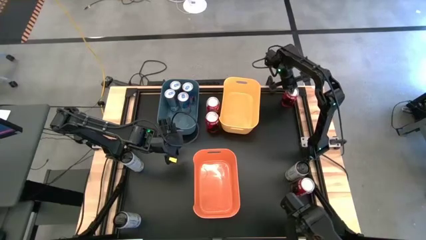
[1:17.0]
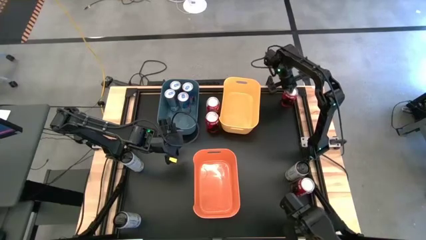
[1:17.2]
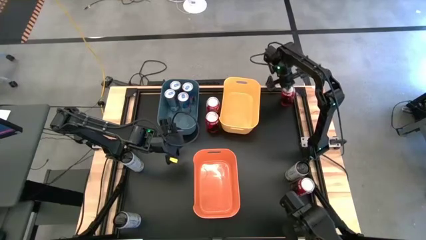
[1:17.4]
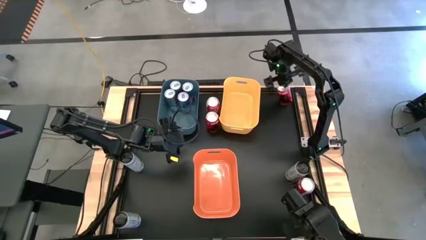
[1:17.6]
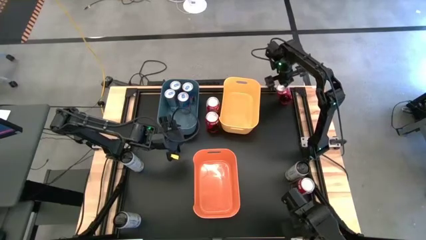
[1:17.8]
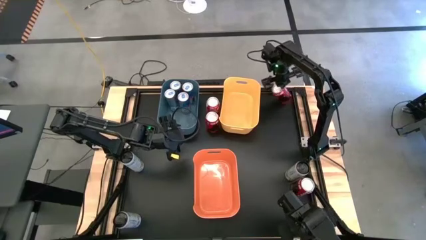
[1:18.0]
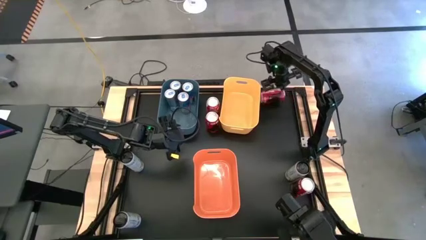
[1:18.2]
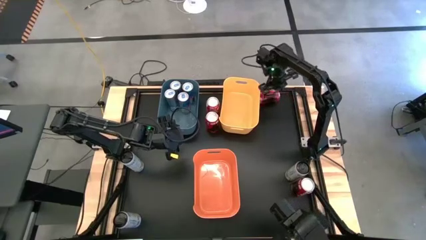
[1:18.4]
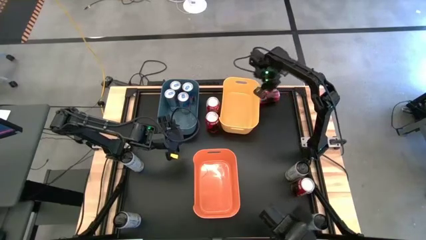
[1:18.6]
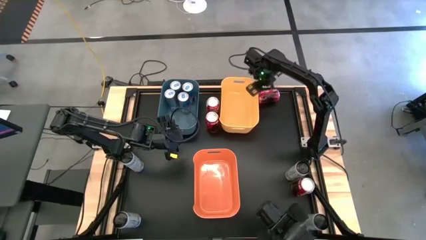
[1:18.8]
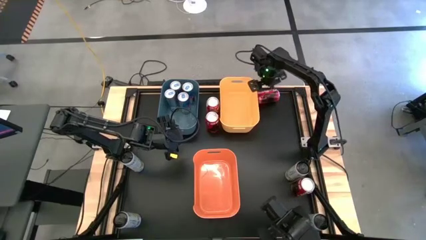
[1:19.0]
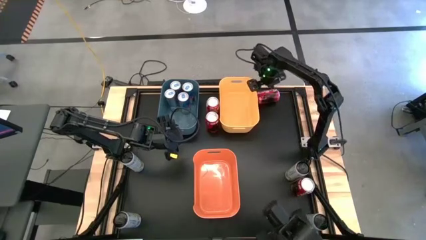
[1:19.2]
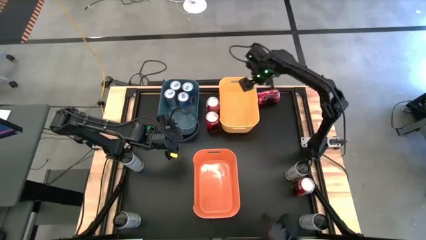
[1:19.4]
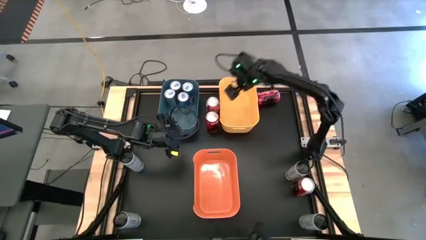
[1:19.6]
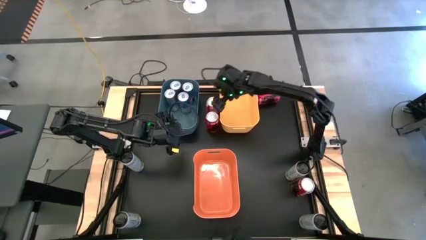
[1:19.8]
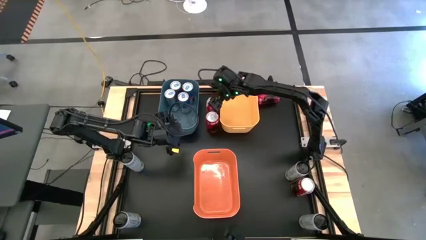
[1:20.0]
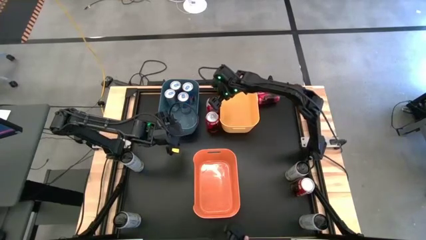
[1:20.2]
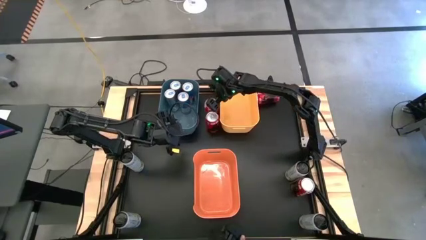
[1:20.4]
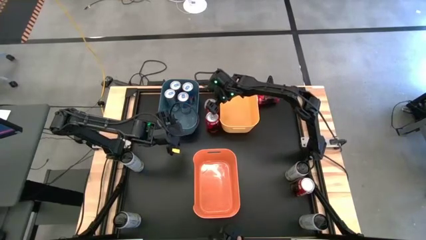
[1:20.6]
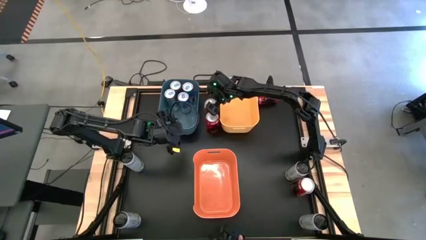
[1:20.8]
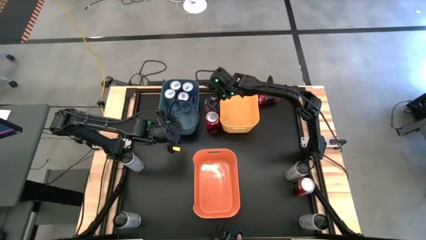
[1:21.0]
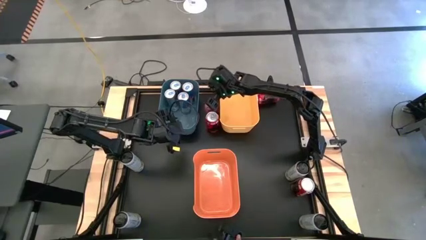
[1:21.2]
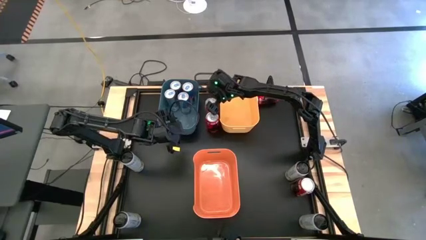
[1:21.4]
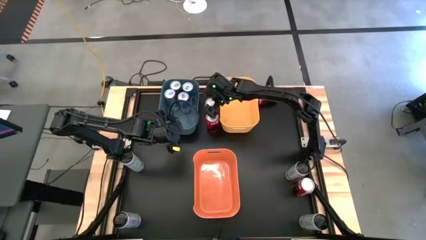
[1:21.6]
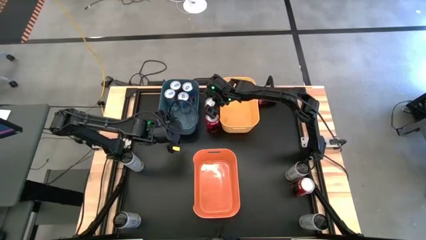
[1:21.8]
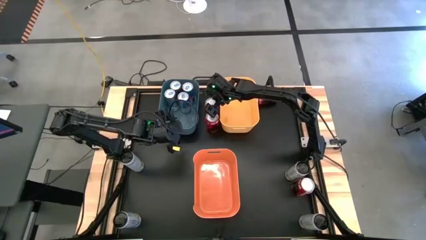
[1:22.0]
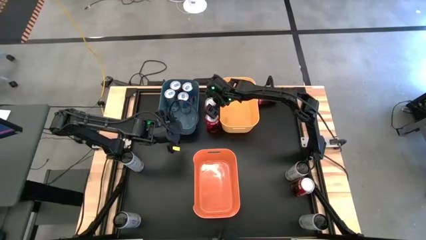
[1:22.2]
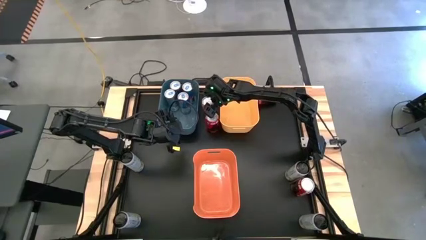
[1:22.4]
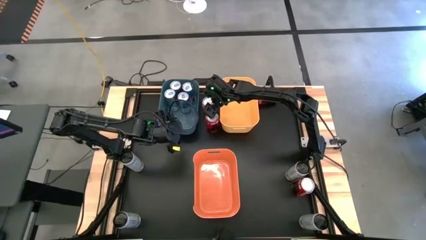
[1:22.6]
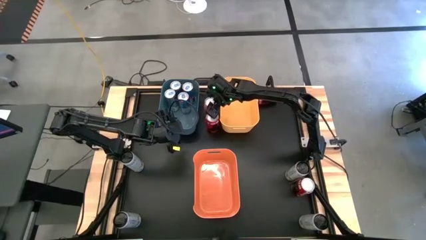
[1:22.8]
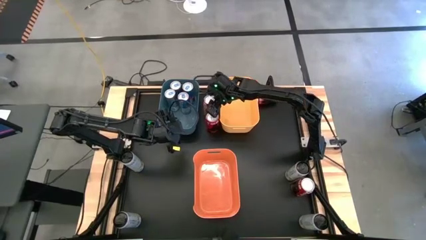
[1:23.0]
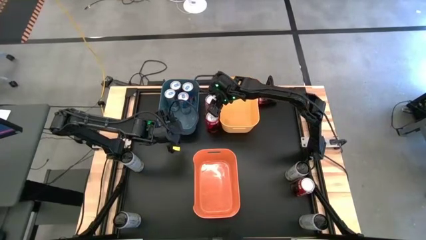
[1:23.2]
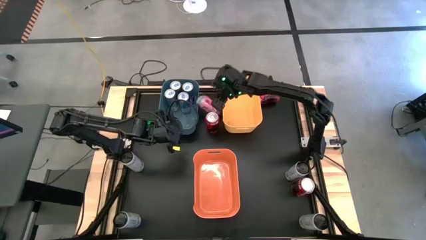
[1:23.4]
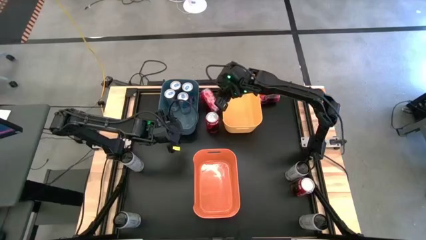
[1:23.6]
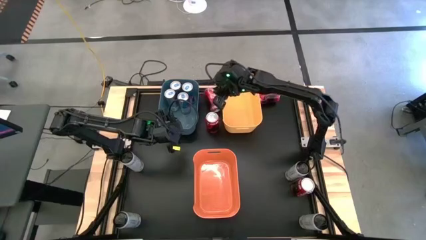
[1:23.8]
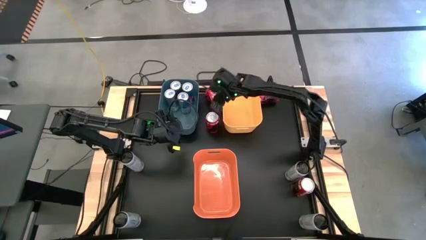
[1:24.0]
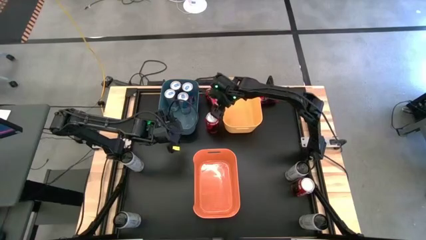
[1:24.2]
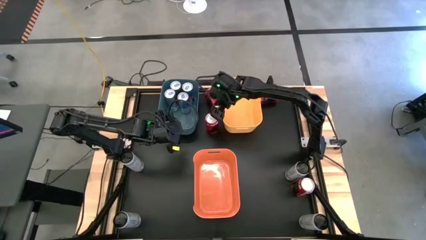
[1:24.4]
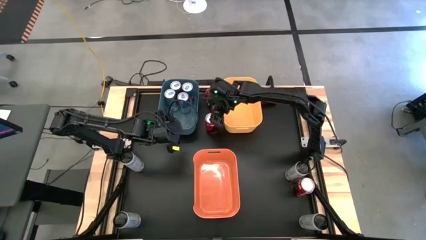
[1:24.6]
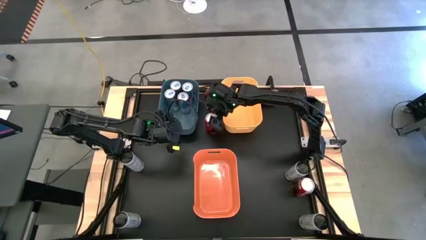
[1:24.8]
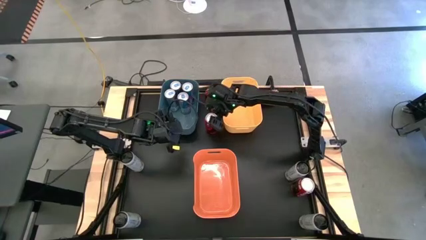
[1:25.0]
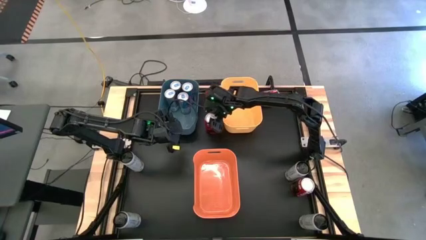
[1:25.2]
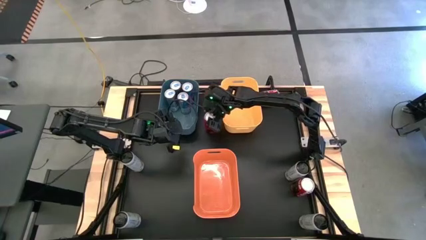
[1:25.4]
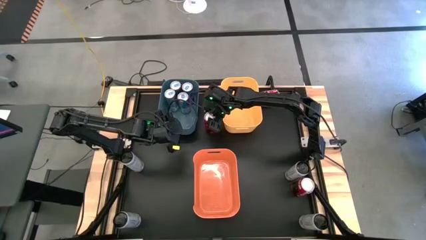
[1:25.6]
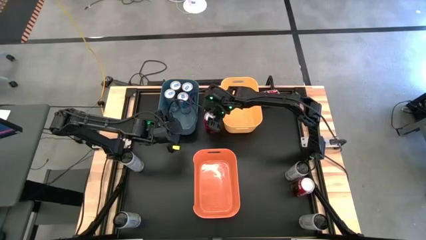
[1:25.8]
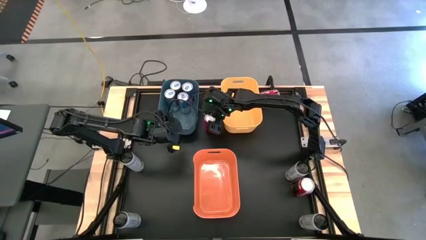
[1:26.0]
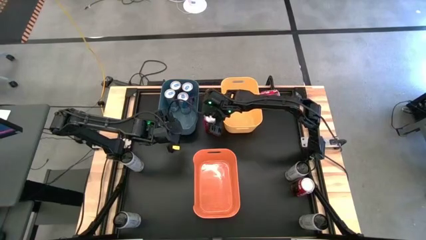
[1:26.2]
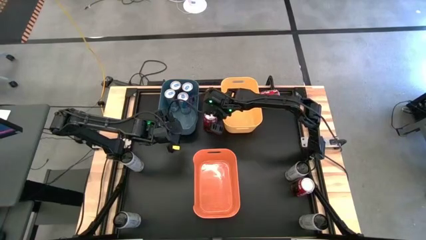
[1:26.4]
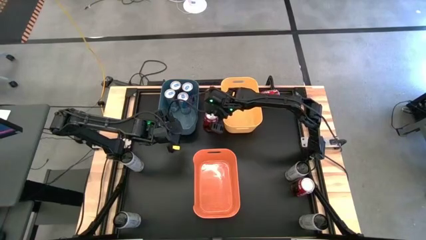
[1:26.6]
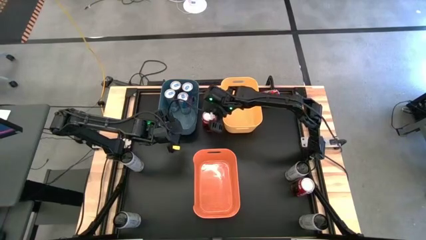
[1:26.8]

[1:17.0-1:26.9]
Task: Sort soda cans
Put the bottom left red soda can into the yellow bin

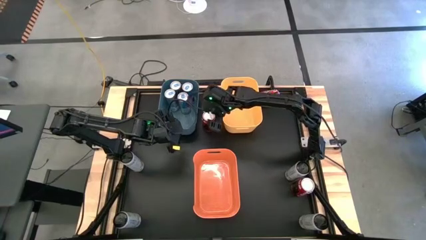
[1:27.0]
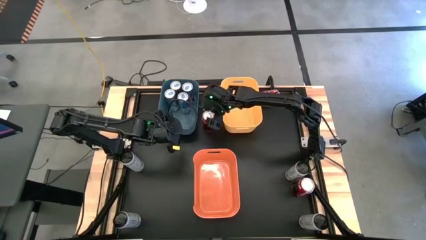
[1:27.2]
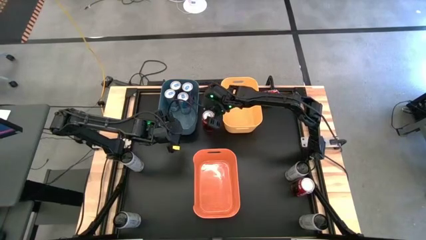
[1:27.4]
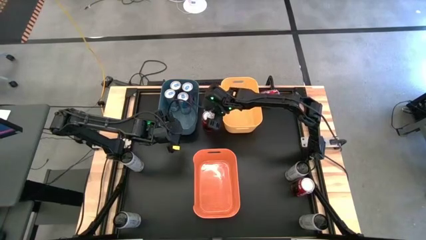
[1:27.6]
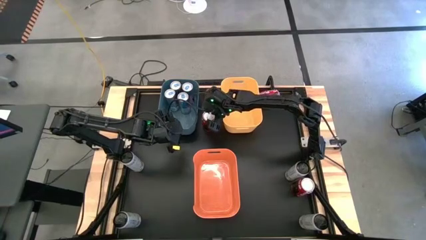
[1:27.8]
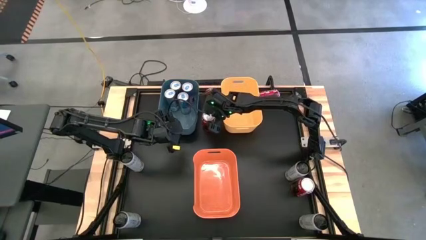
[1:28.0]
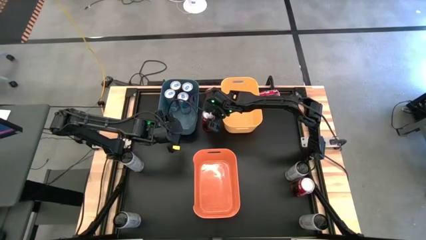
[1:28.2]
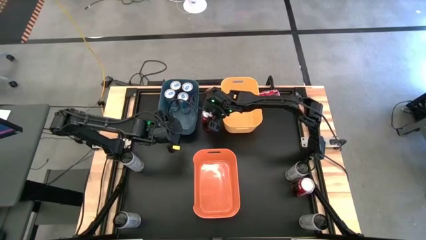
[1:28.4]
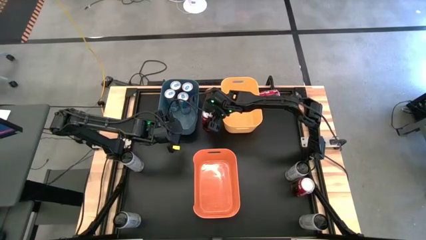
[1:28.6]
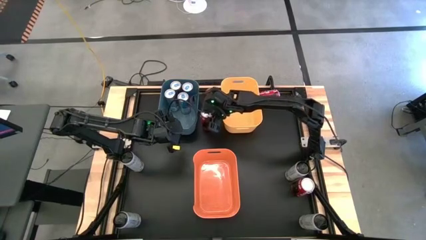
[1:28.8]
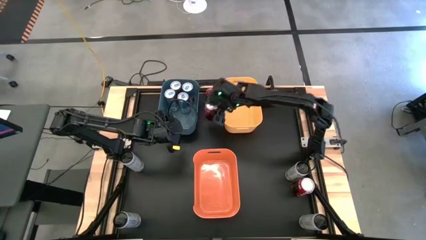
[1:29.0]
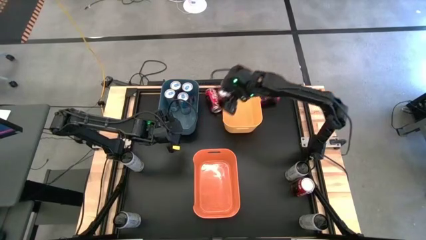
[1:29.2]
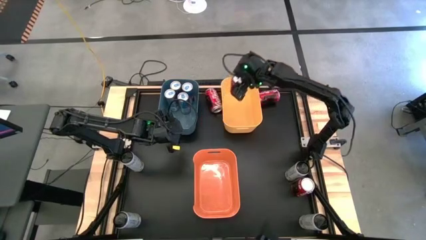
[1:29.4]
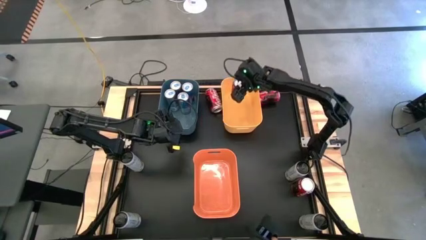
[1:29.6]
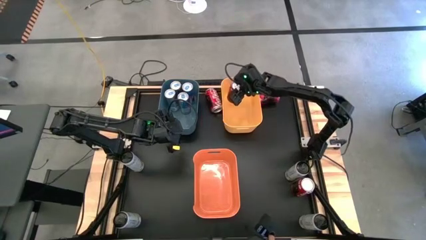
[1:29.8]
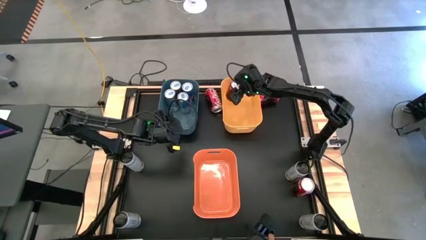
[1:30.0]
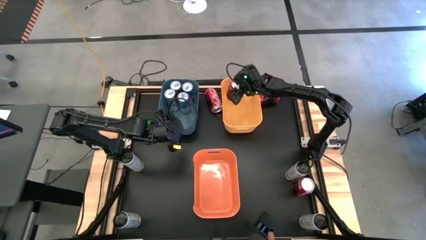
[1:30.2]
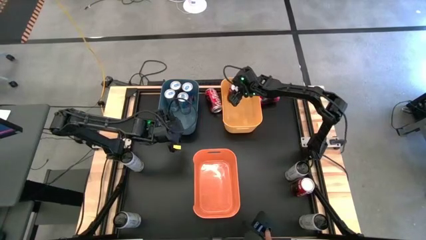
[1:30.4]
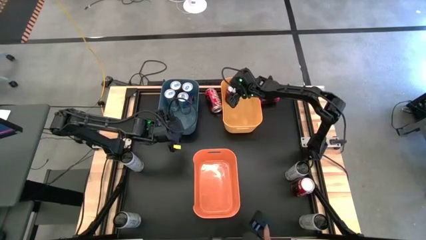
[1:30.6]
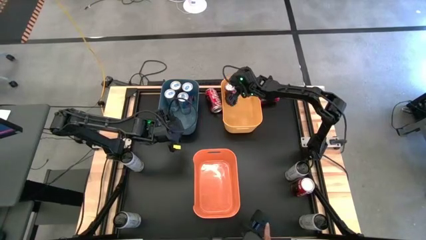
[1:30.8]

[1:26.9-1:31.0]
Put the bottom left red soda can into the yellow bin

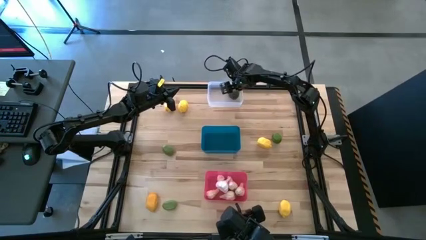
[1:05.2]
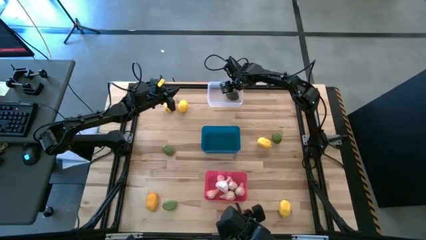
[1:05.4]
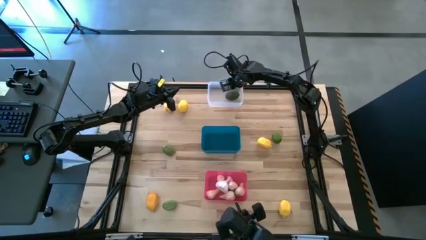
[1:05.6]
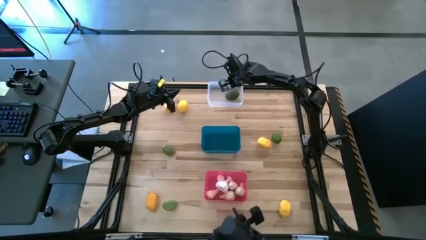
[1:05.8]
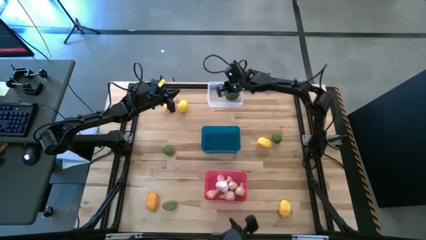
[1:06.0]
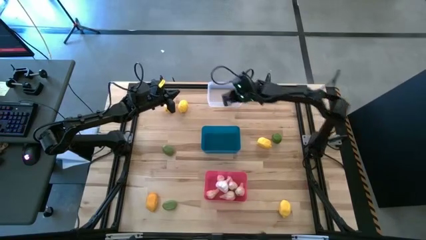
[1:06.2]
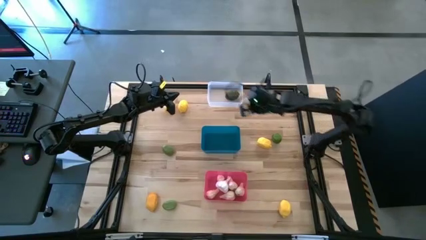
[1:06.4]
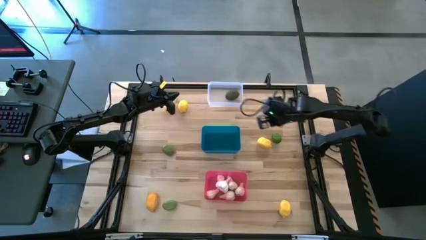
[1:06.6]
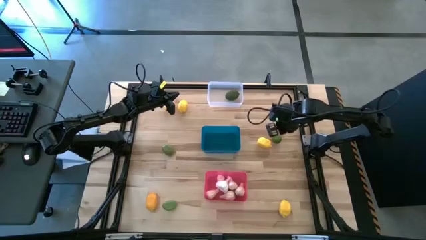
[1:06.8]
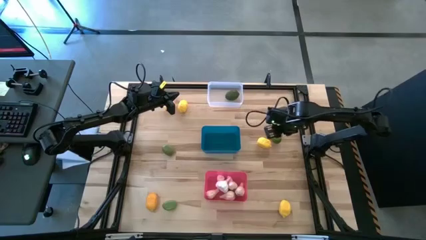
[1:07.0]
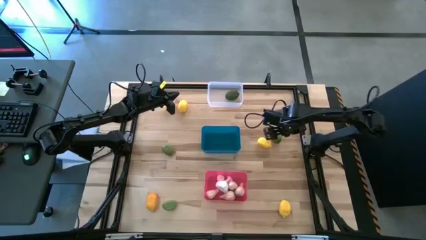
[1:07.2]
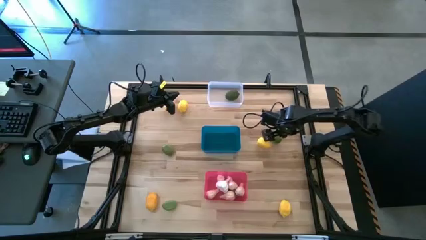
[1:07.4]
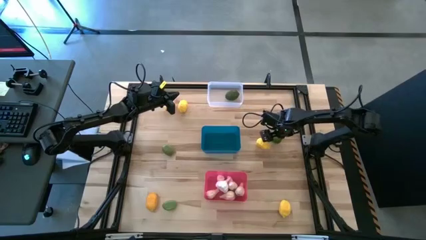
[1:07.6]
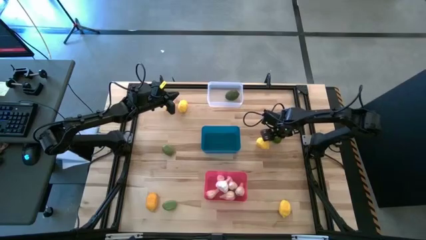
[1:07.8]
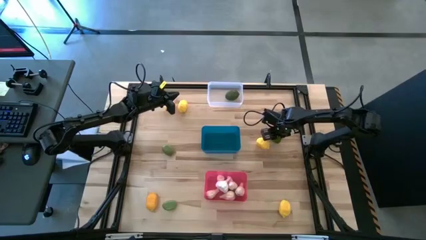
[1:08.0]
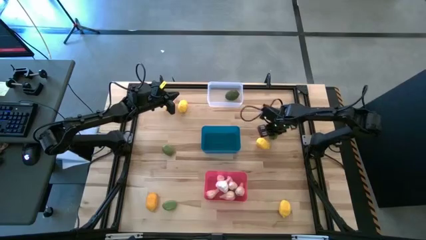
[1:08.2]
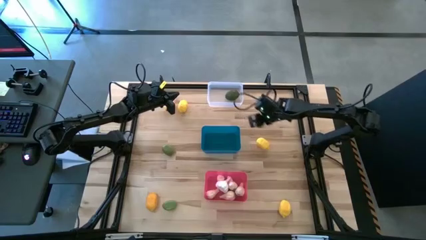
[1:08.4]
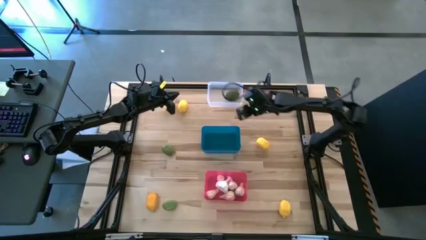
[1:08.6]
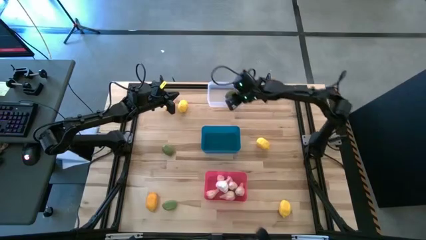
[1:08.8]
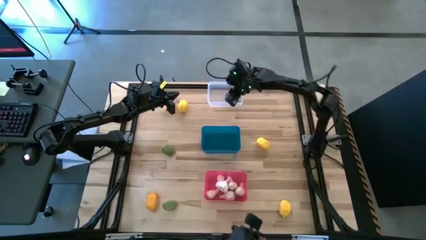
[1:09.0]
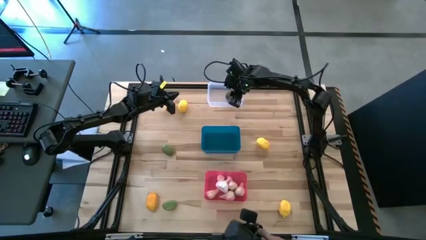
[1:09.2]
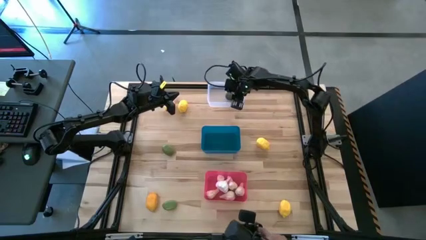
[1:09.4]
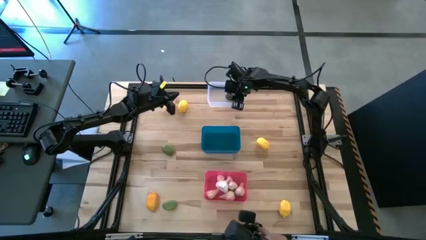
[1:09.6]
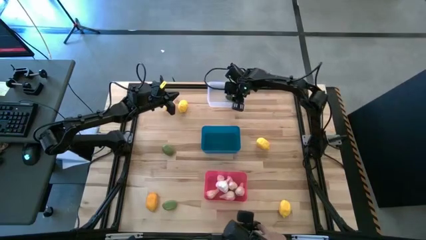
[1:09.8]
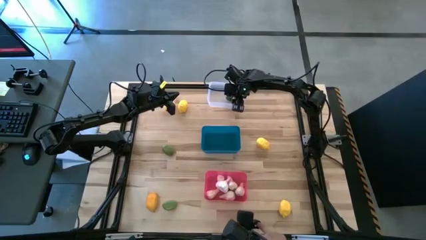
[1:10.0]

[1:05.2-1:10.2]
Task: Sort produce into baskets
Put the top right green lime into the transparent bin
